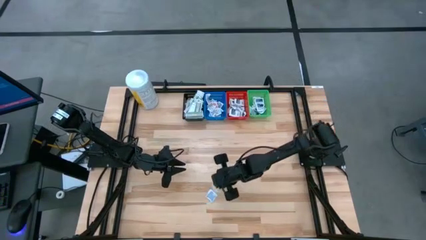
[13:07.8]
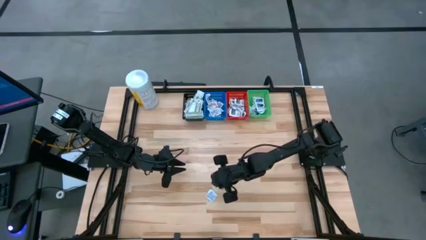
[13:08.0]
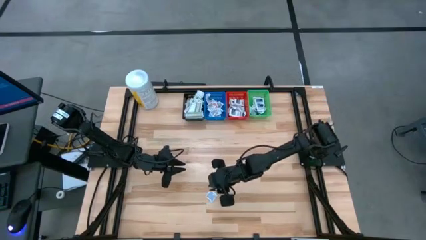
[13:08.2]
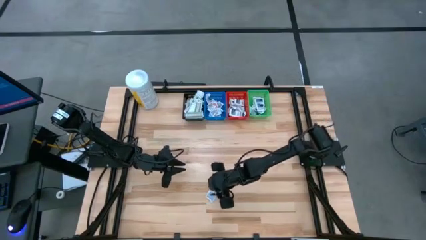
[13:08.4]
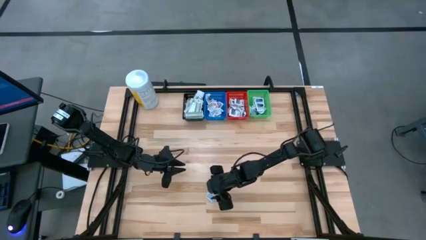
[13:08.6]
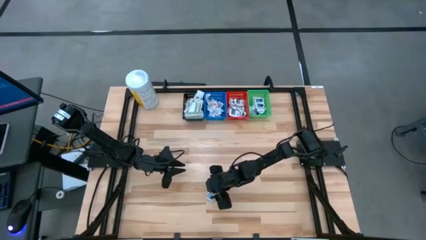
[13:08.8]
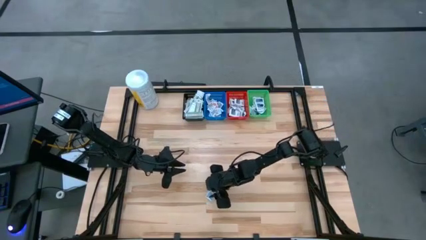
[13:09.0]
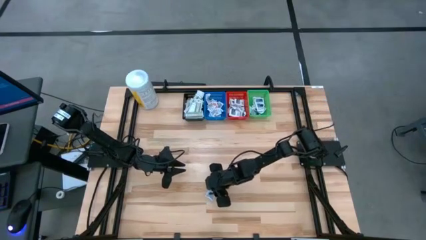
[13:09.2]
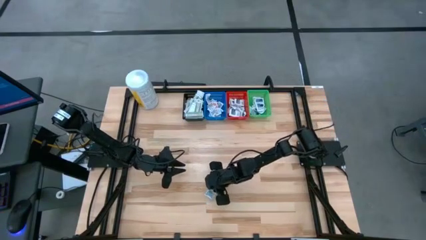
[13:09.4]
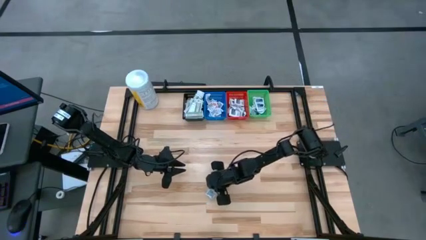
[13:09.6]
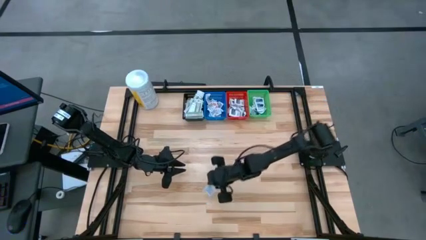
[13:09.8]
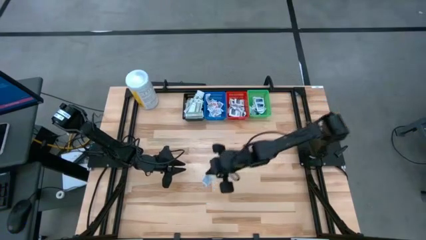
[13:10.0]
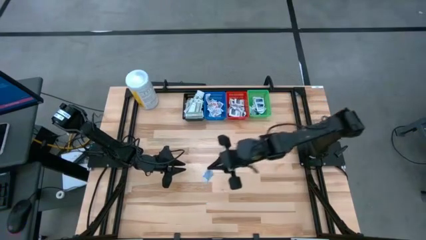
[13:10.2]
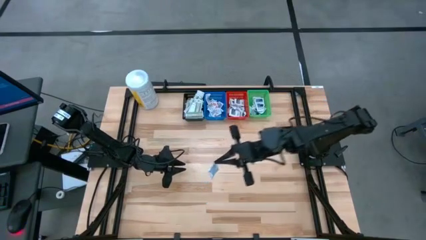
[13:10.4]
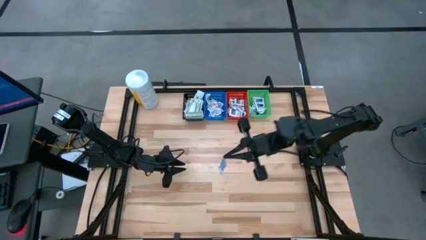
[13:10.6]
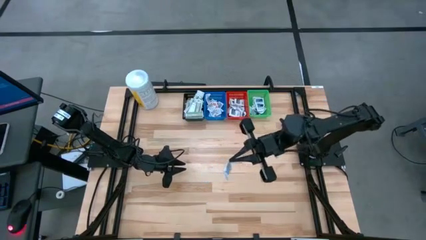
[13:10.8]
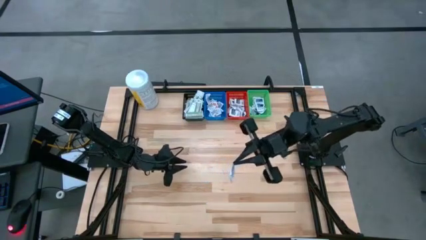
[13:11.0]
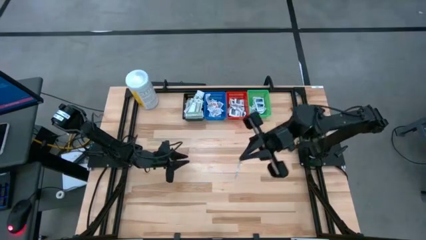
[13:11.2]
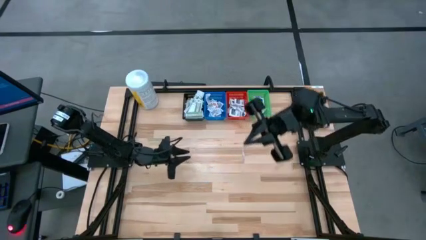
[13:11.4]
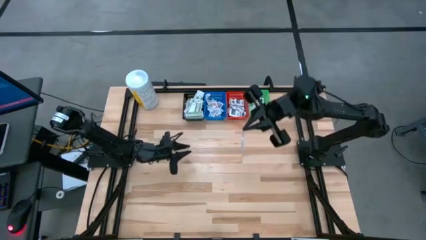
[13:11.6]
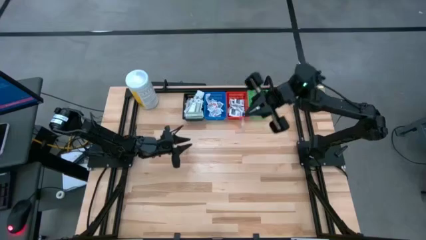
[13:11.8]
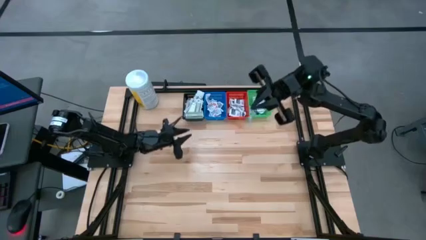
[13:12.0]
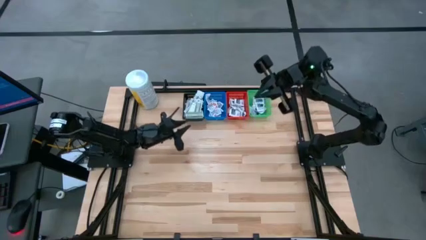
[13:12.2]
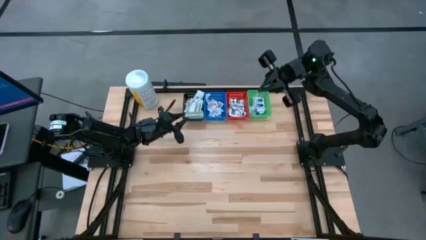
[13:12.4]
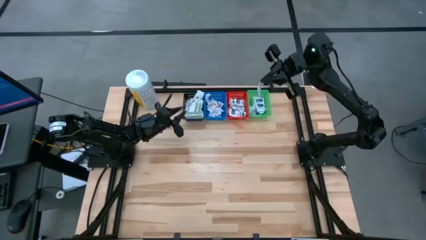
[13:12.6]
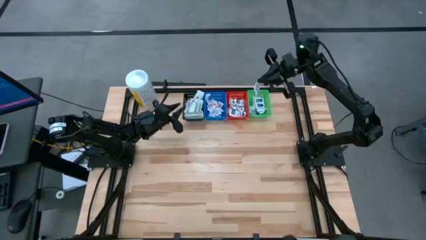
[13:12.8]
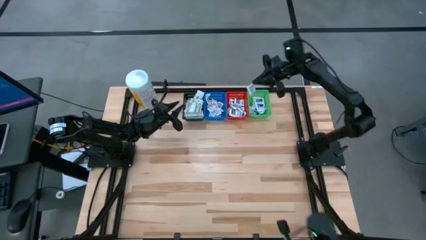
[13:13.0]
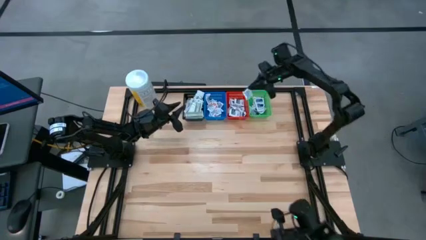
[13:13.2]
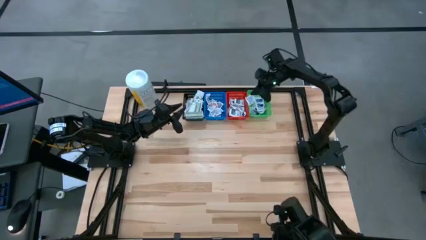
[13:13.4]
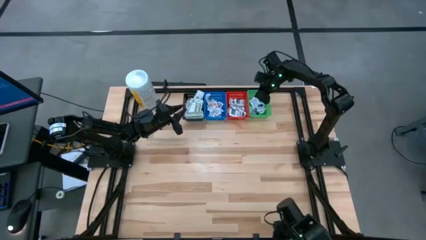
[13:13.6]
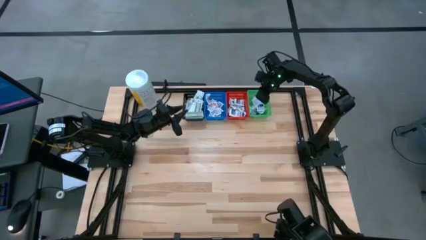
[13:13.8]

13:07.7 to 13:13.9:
Task: Pick & Place First Aid Supplies
Put the blue alcohol pad in the green bin

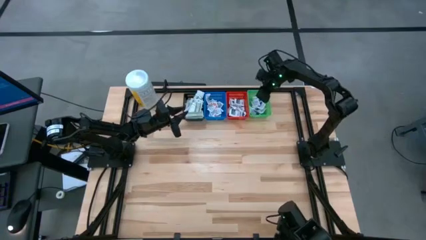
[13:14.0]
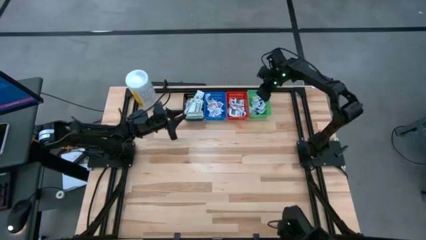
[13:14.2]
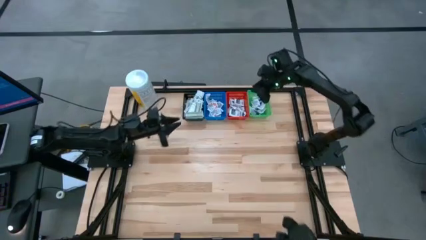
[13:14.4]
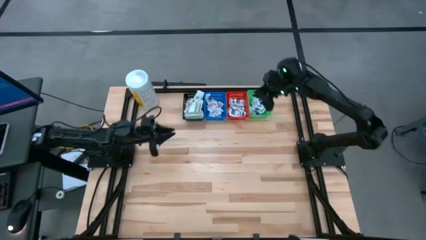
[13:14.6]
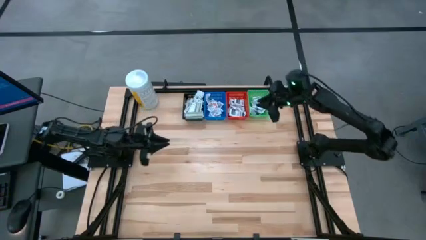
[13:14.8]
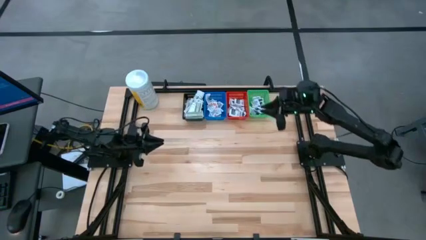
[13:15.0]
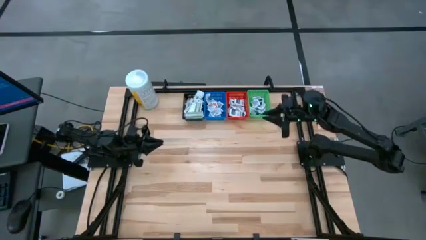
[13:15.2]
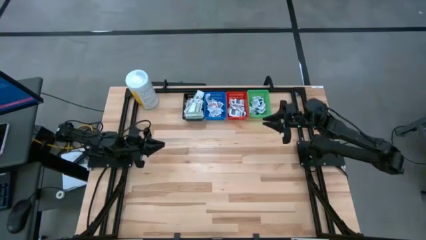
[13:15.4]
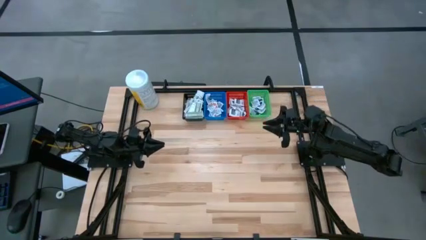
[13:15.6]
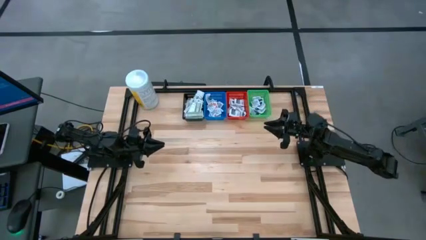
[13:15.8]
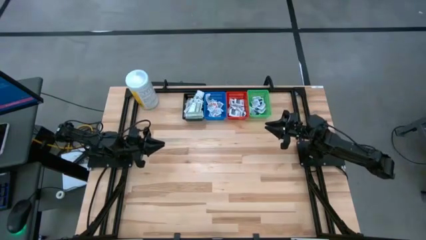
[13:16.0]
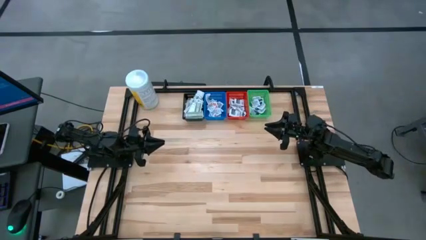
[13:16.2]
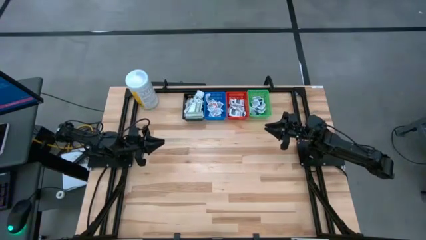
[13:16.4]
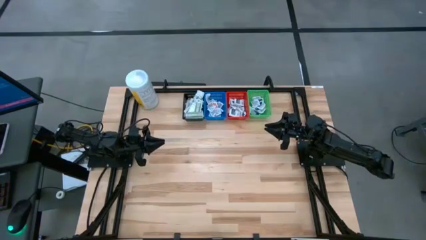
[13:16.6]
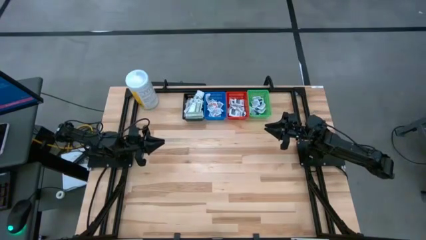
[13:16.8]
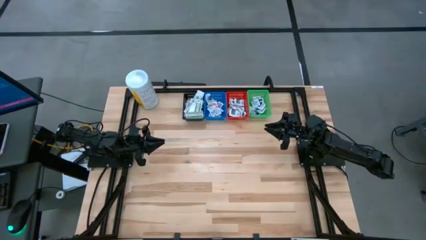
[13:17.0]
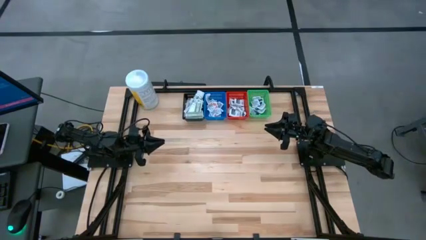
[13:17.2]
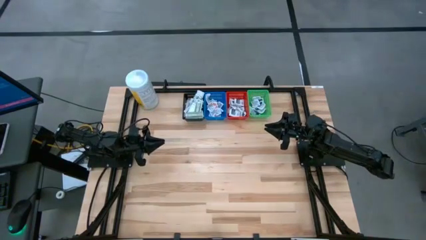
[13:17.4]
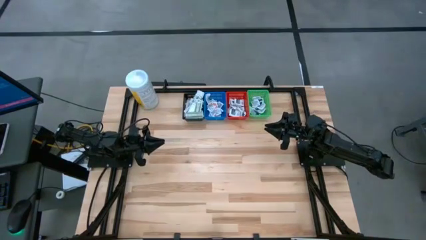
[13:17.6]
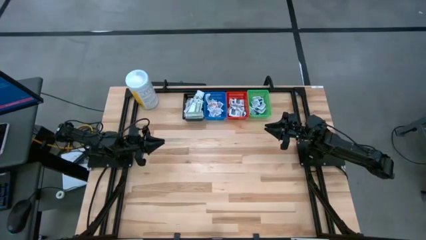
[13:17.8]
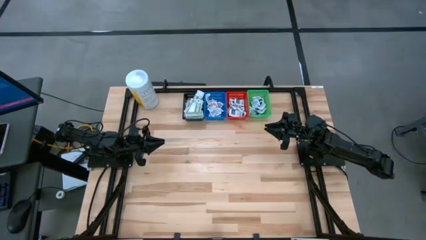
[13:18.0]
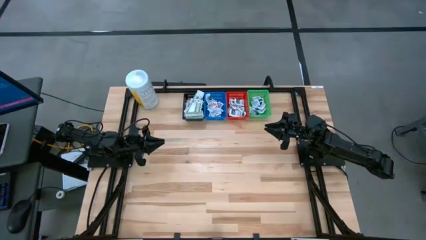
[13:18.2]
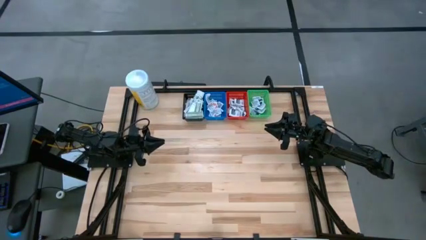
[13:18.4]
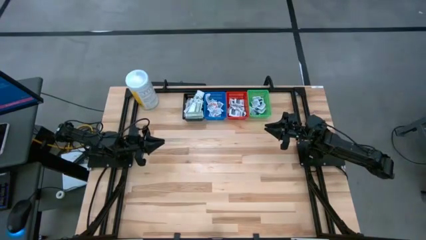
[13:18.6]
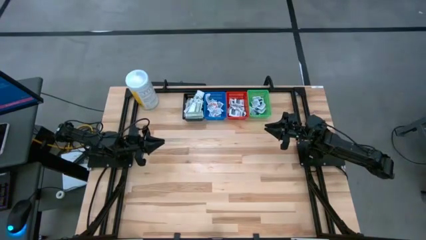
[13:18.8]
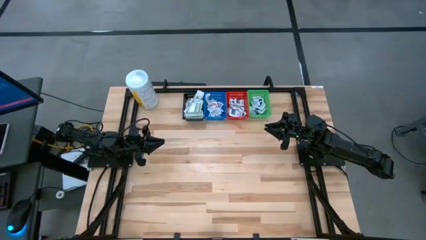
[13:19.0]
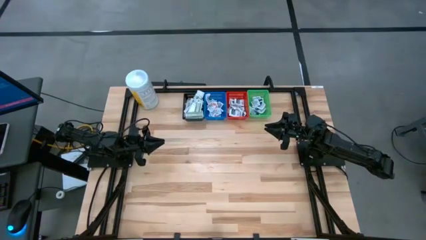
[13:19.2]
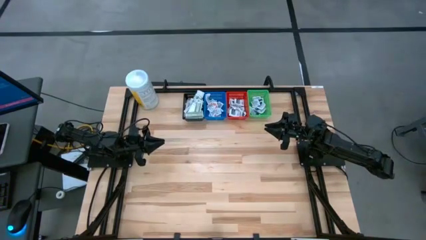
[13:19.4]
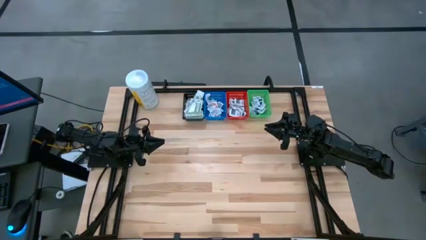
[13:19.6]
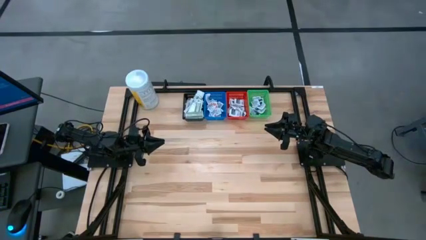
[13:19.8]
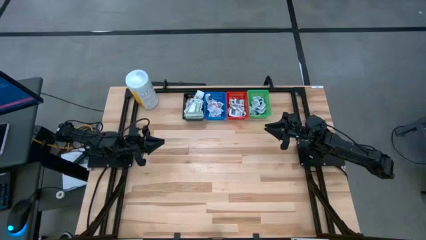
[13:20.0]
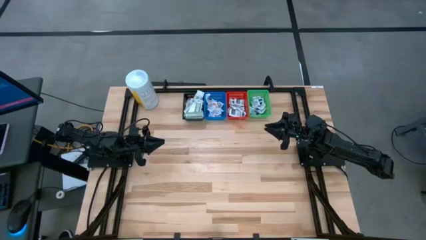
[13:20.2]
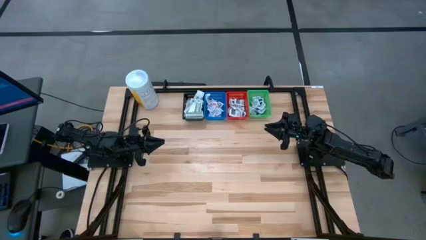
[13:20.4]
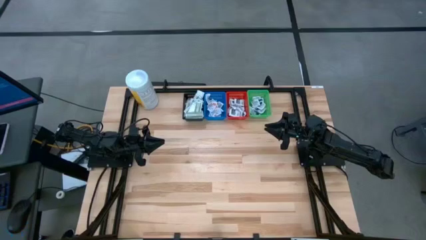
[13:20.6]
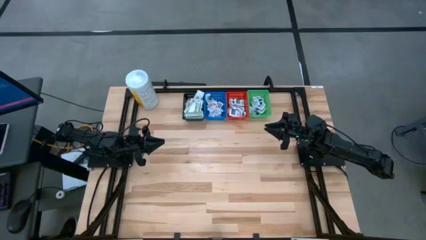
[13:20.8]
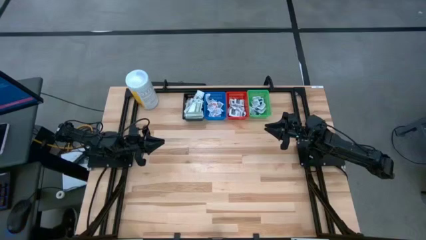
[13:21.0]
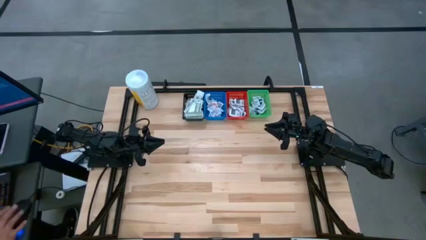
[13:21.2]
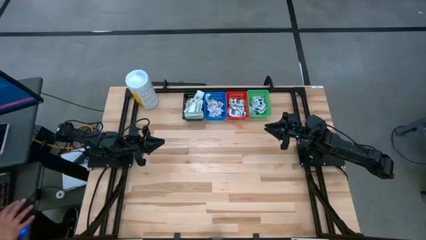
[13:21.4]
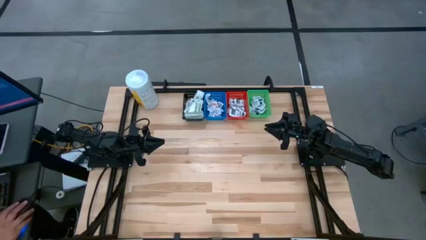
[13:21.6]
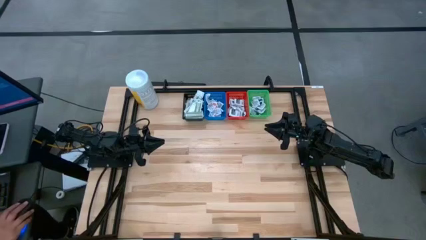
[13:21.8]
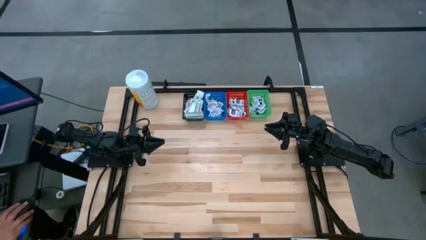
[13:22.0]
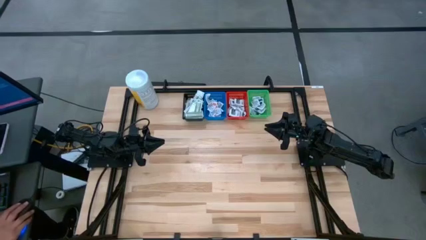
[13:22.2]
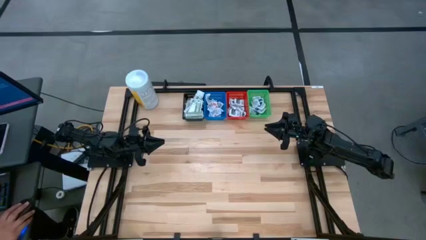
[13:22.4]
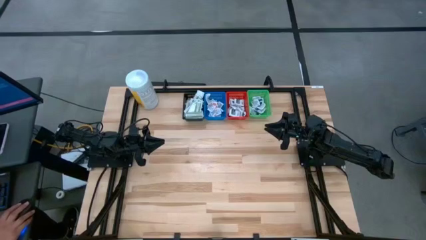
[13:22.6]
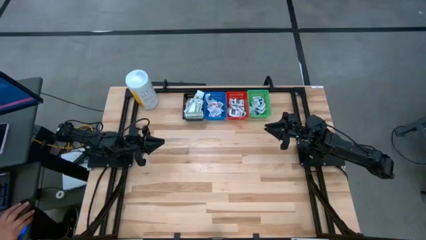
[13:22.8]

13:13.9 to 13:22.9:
Return to Home Position
